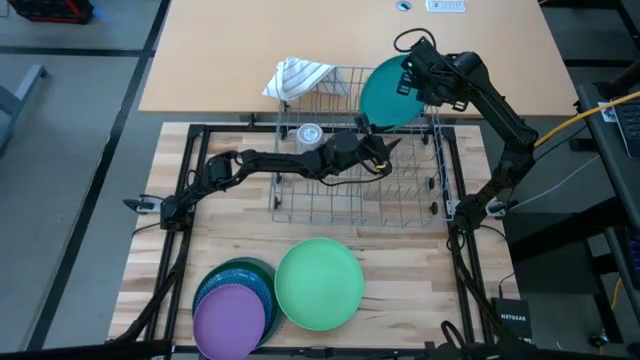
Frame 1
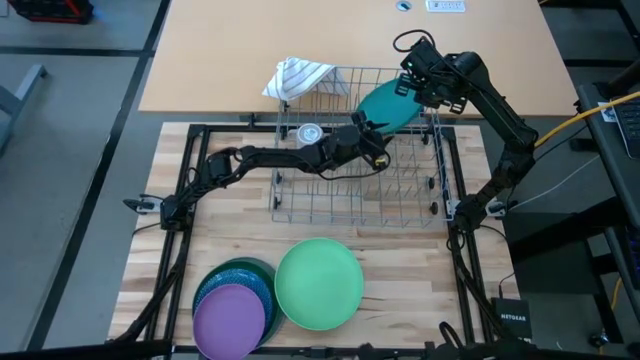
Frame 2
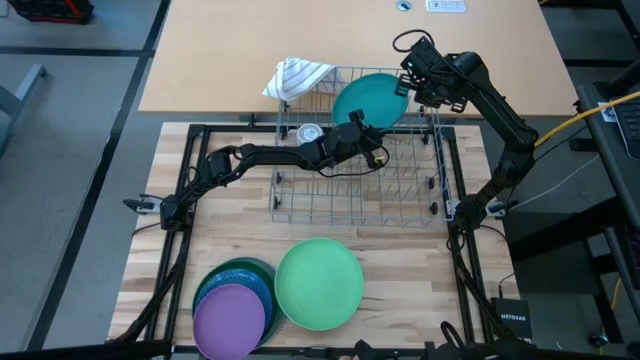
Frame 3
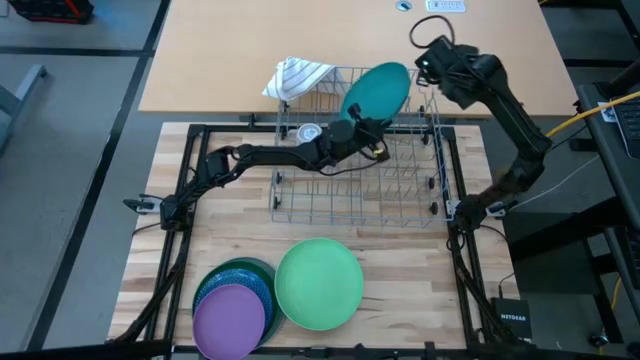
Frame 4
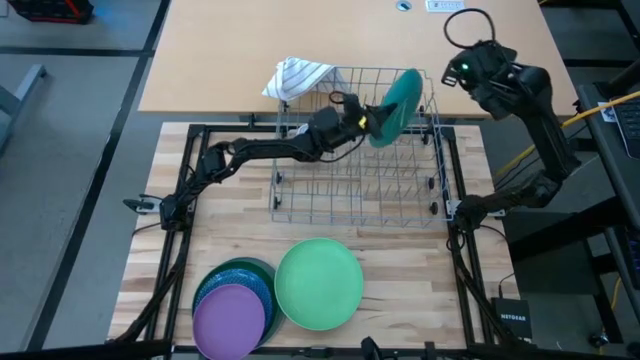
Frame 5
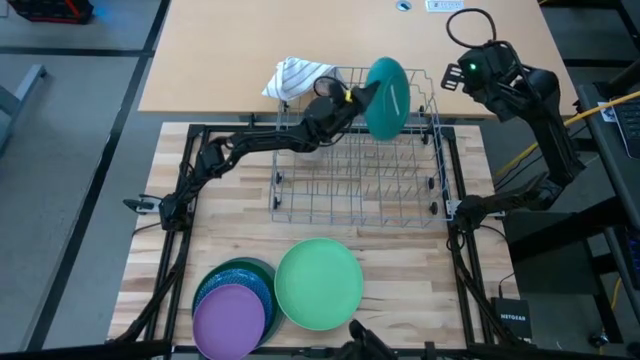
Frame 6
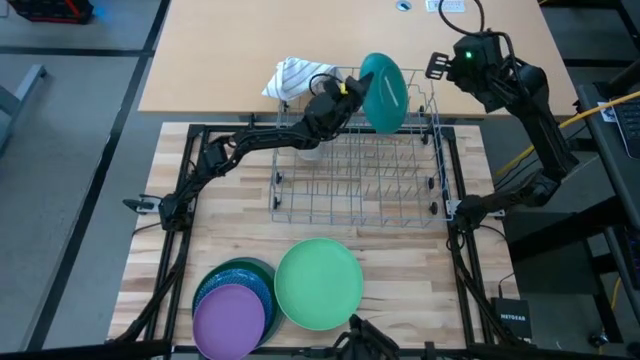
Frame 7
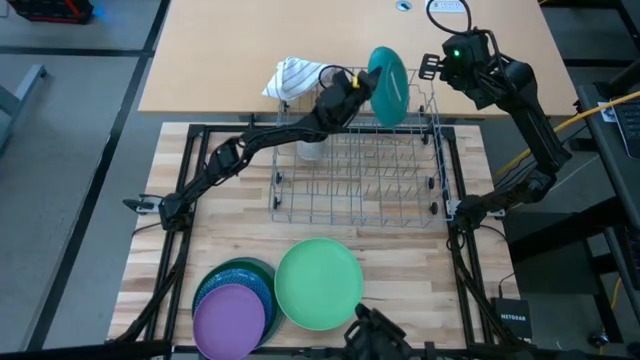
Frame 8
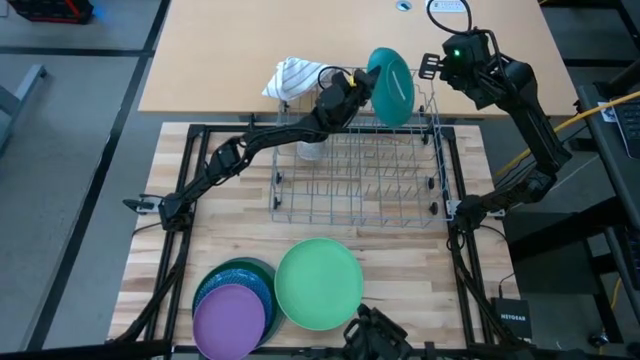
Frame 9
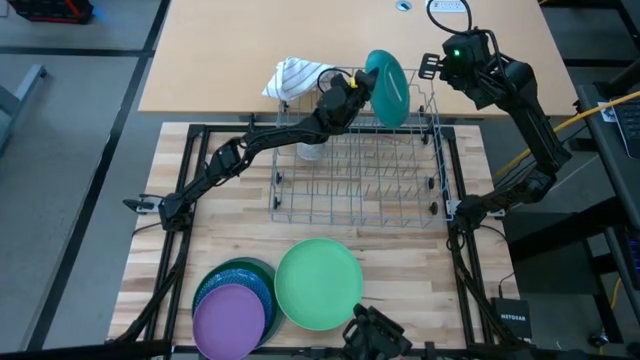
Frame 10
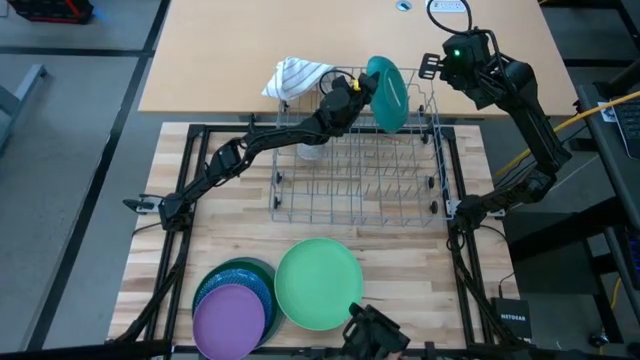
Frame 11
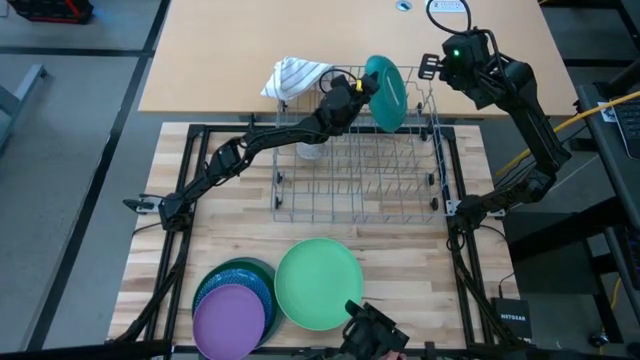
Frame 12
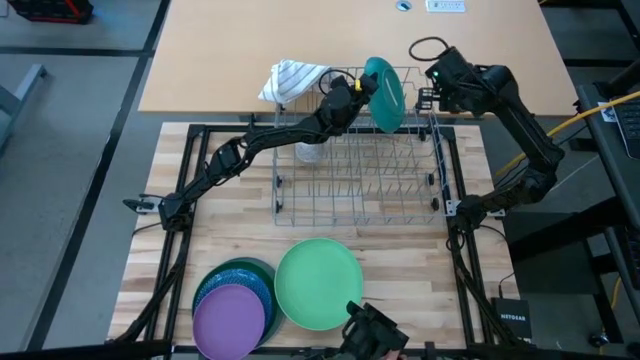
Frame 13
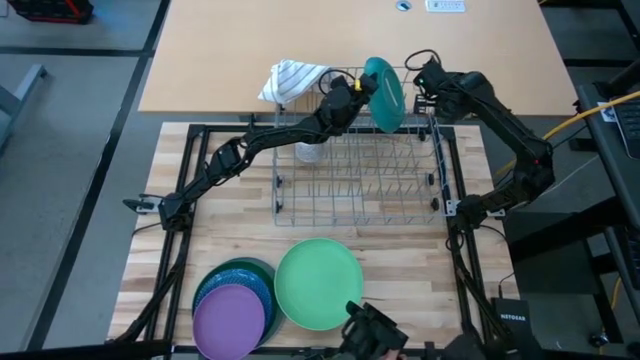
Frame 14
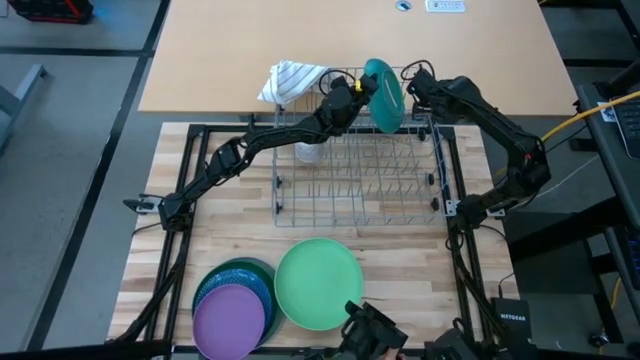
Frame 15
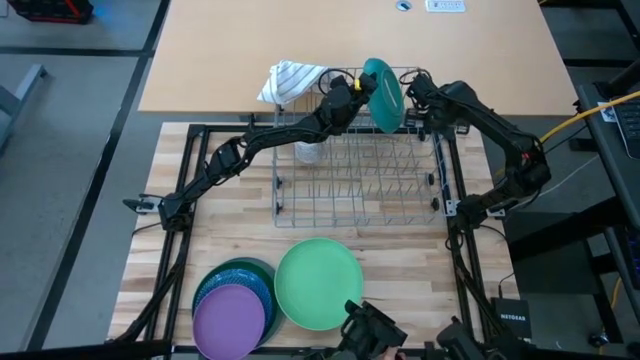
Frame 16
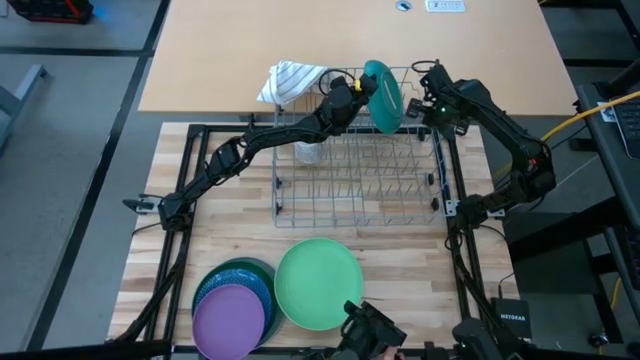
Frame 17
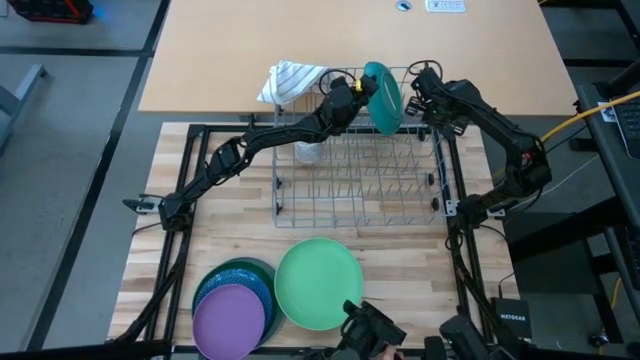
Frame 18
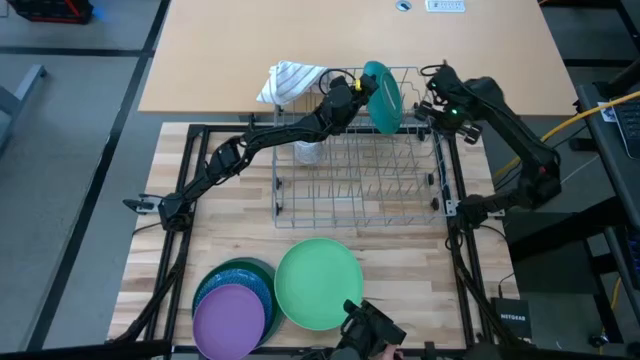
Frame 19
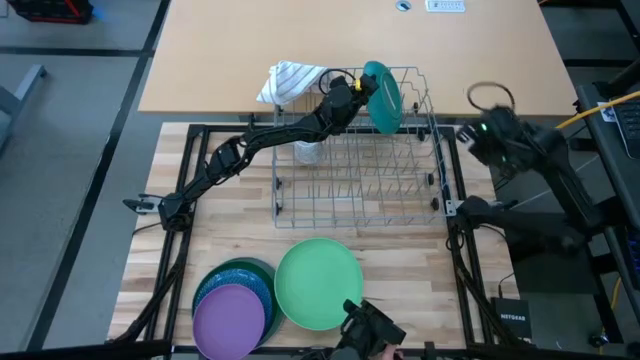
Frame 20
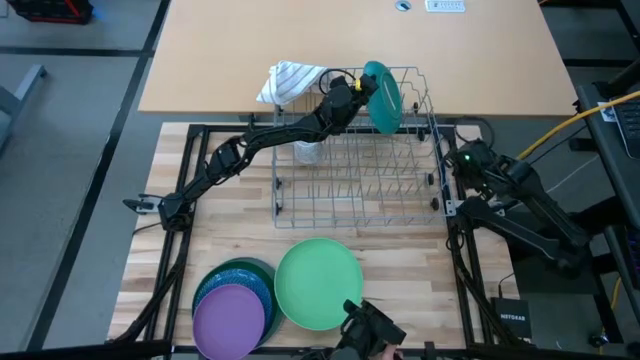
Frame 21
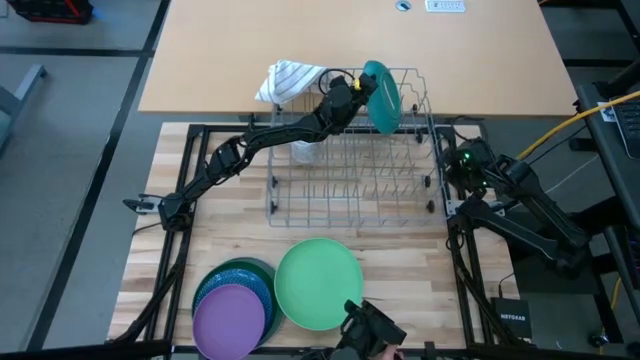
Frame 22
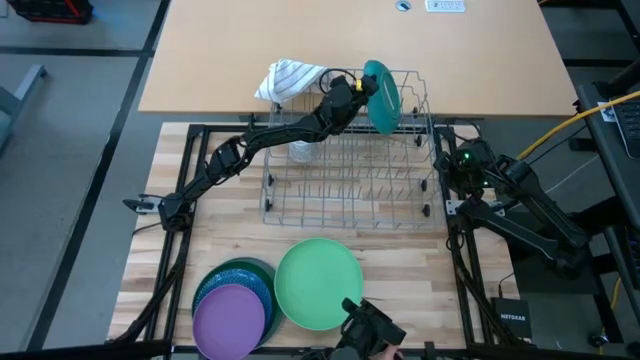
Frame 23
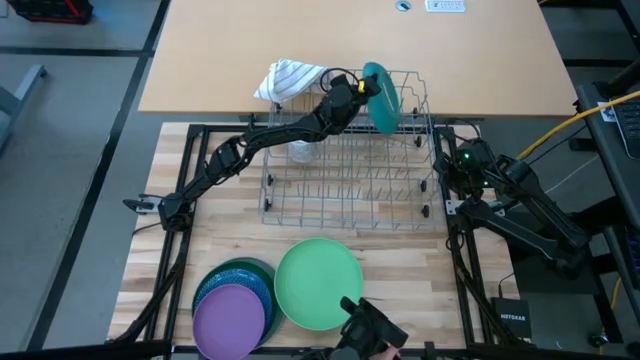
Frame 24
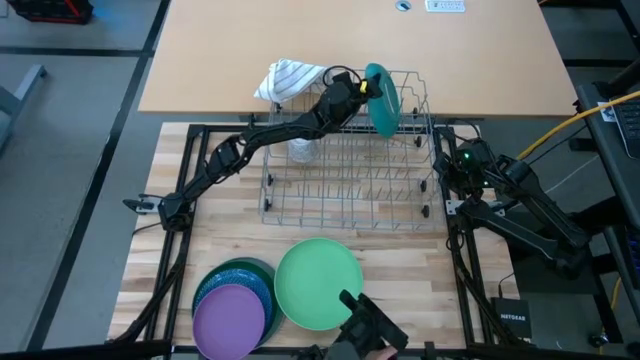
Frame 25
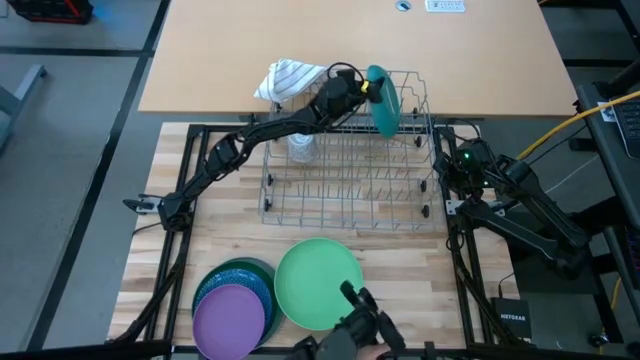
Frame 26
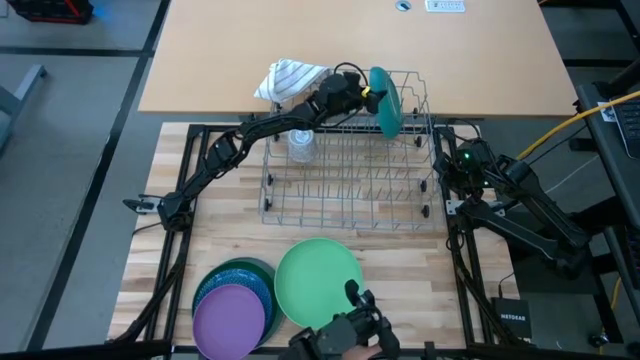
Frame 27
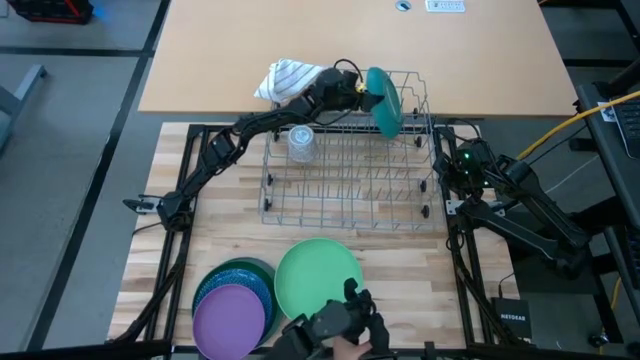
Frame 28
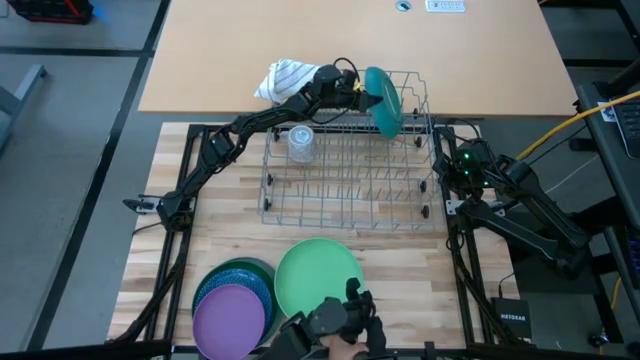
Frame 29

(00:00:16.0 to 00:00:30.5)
Task: Sort dishes
Put the blue plate in the dishwasher rack

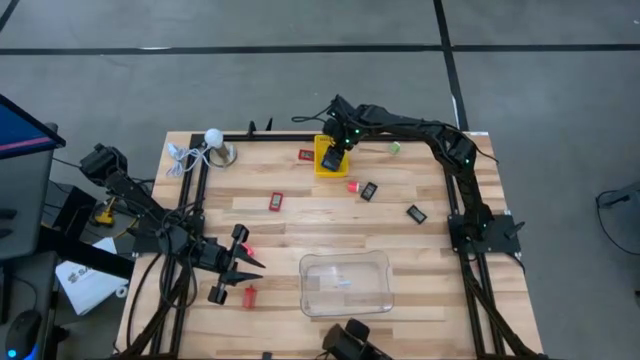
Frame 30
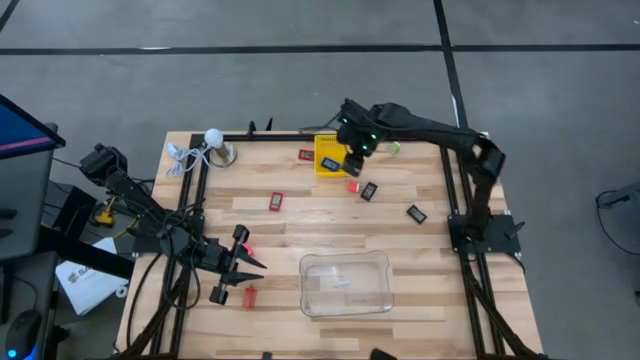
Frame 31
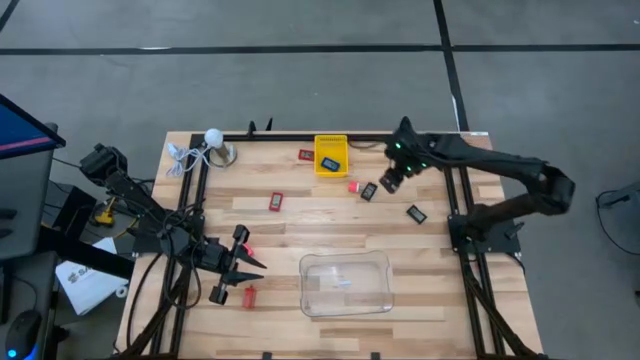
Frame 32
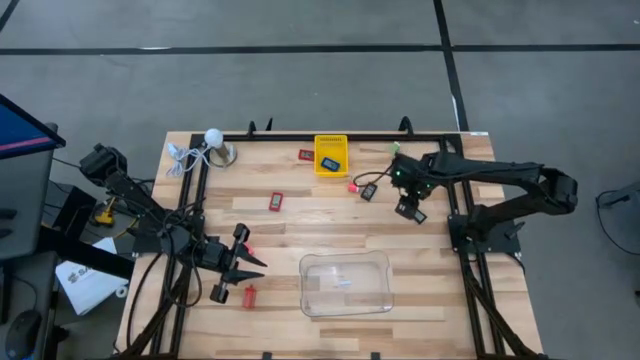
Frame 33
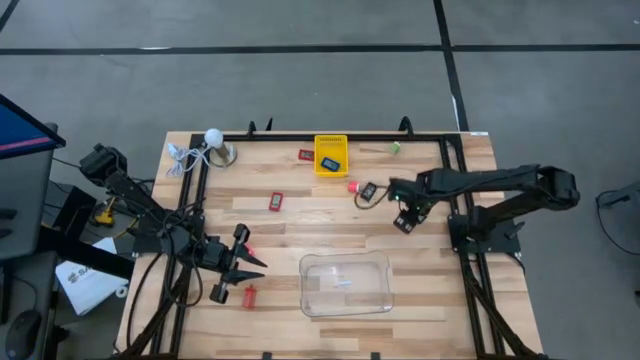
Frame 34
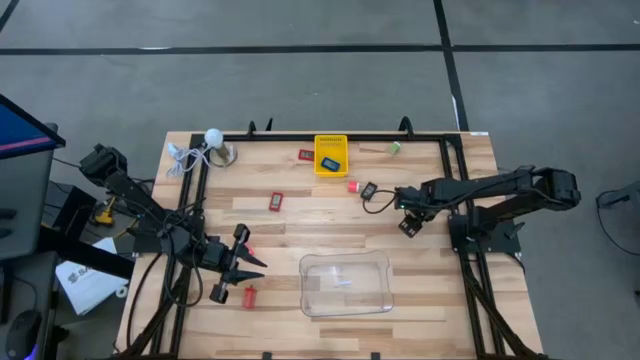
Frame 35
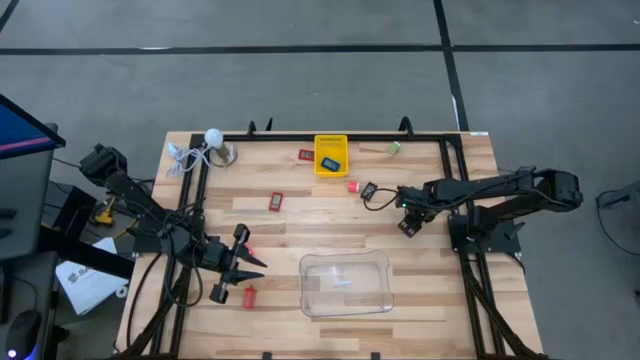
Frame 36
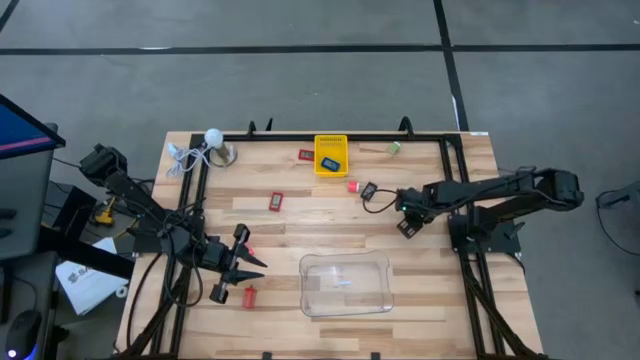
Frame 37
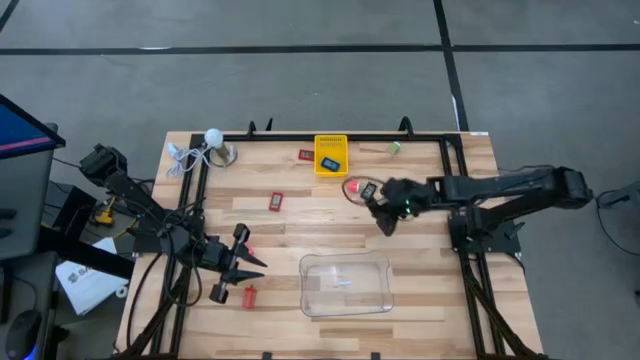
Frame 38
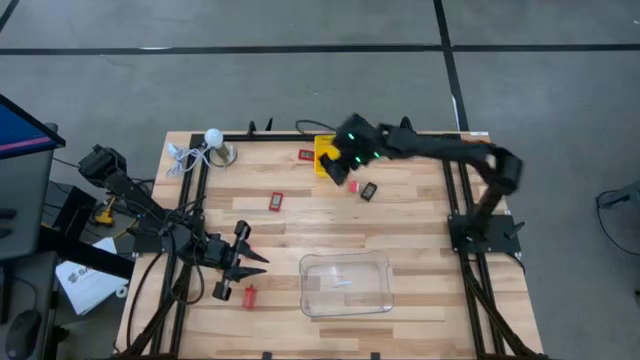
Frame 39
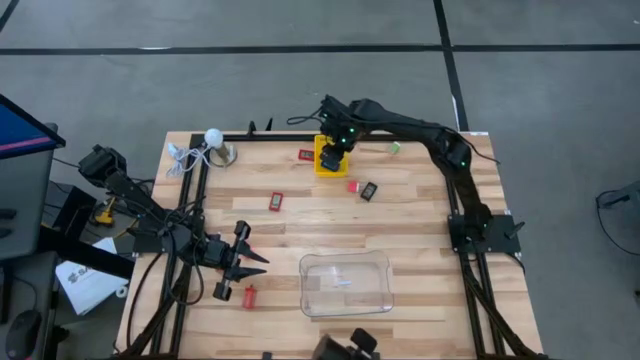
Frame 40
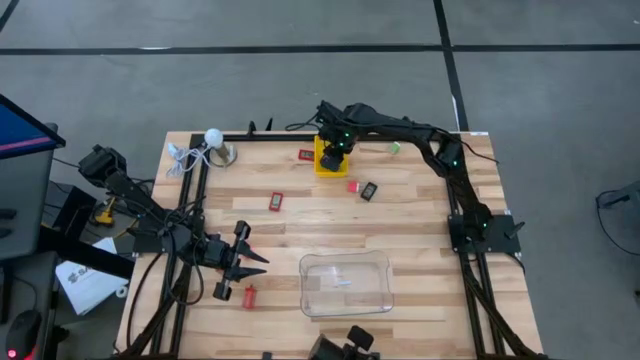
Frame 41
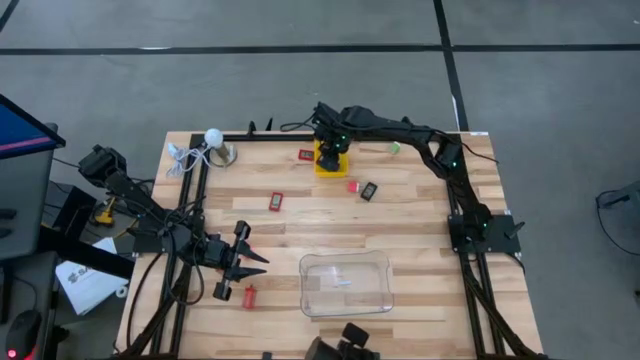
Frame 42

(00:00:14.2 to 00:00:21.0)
Task: Pick & Place Office items
Put the black digital clock on the right into the yellow bin
